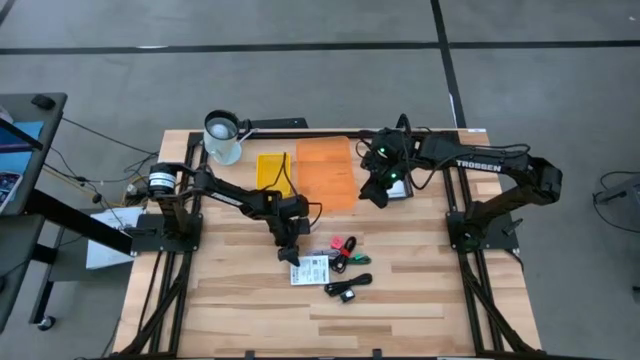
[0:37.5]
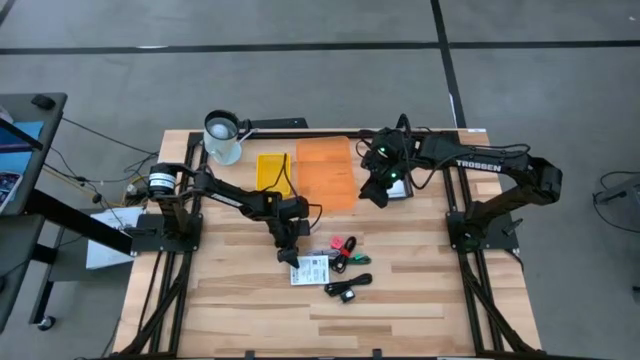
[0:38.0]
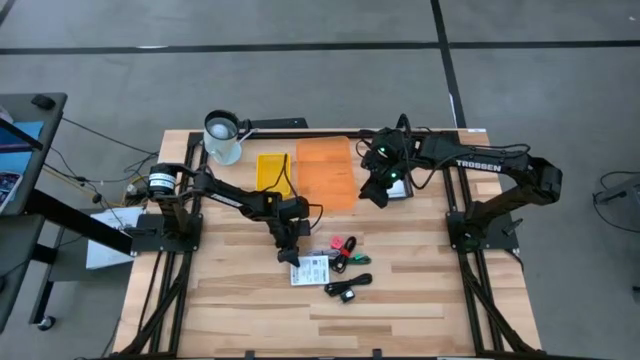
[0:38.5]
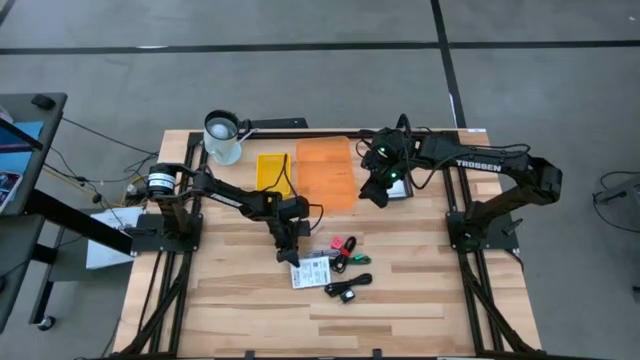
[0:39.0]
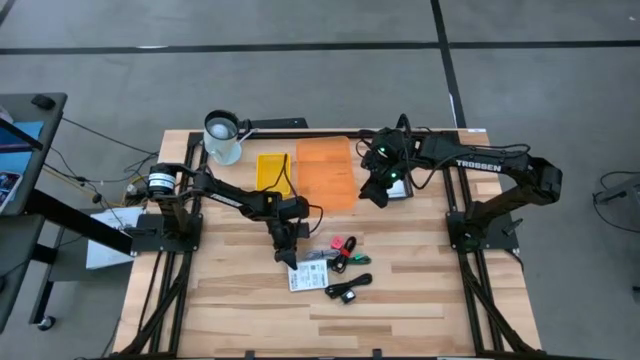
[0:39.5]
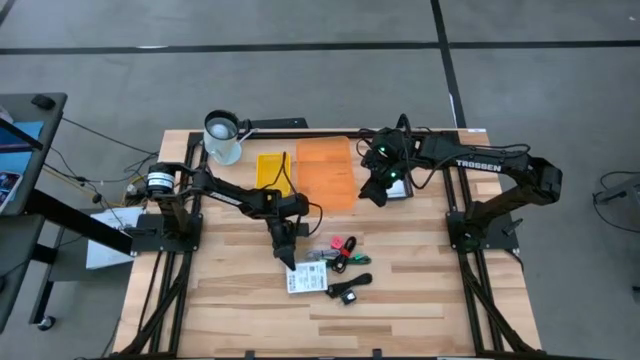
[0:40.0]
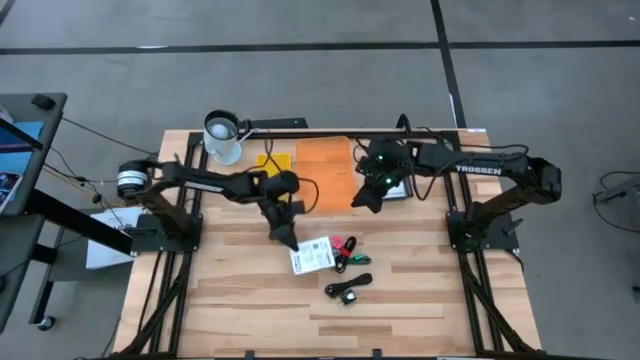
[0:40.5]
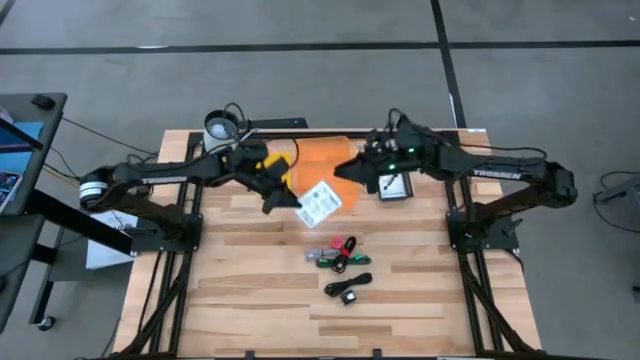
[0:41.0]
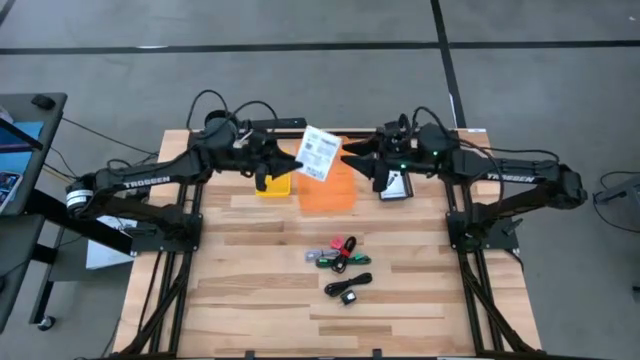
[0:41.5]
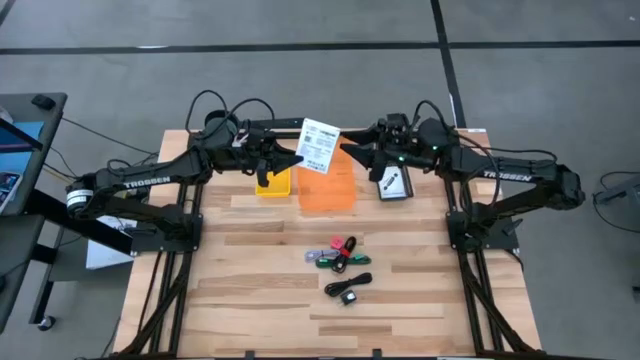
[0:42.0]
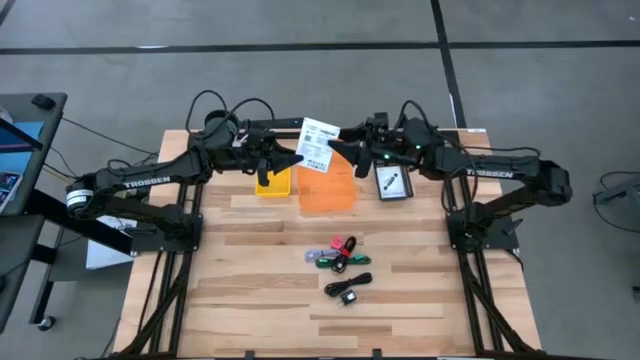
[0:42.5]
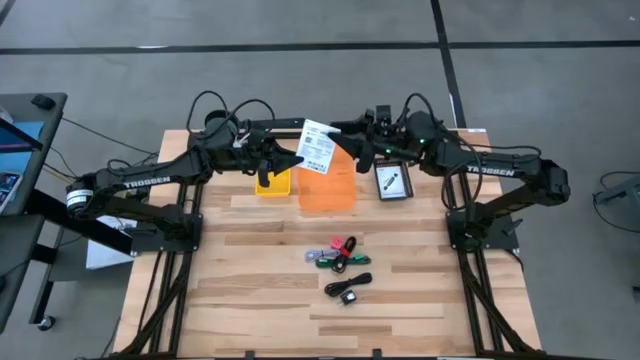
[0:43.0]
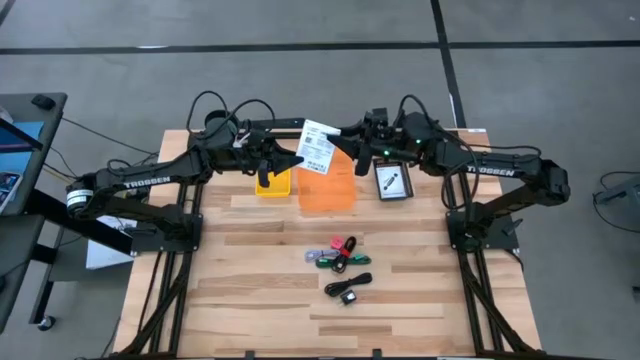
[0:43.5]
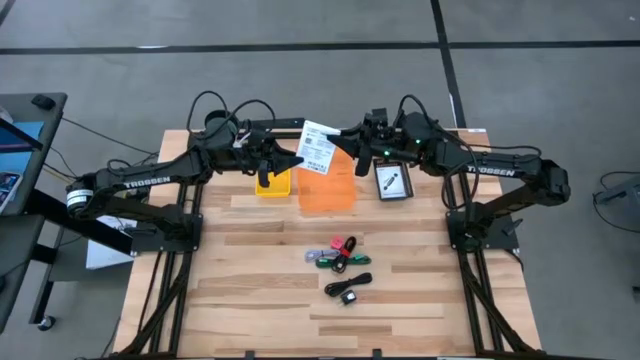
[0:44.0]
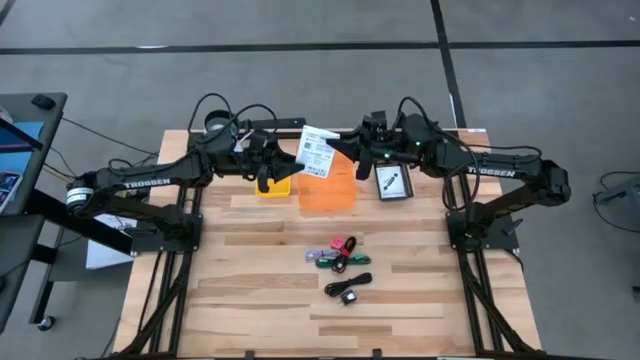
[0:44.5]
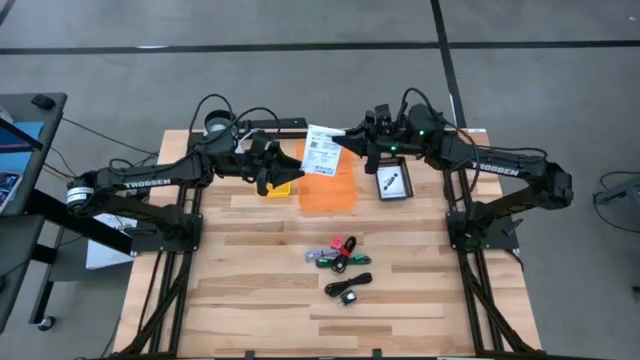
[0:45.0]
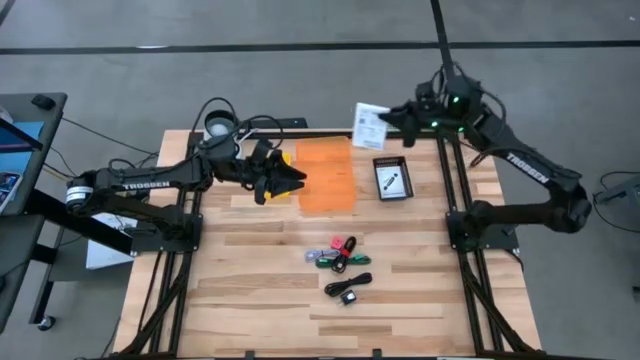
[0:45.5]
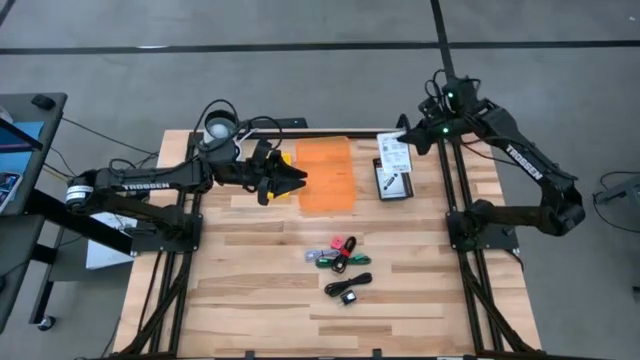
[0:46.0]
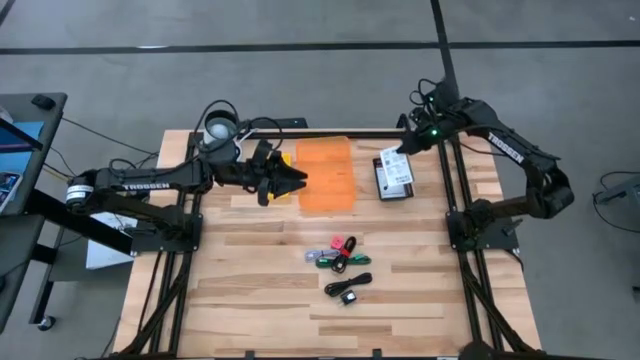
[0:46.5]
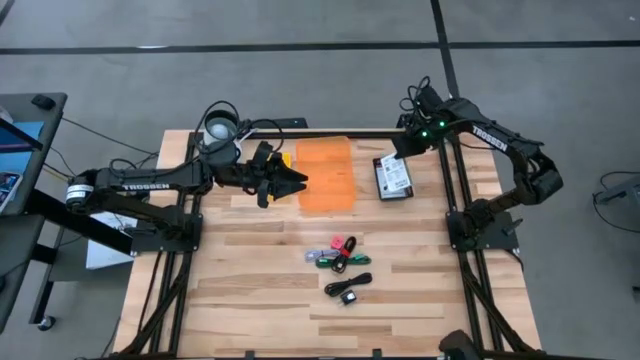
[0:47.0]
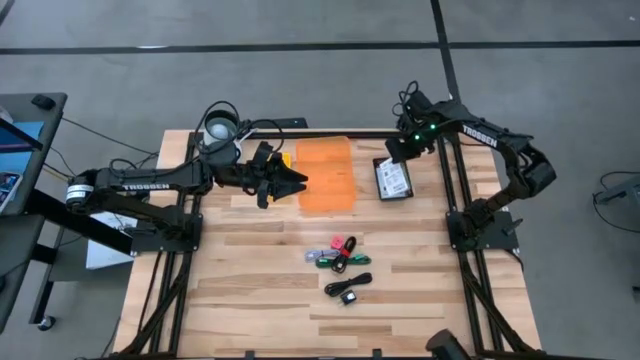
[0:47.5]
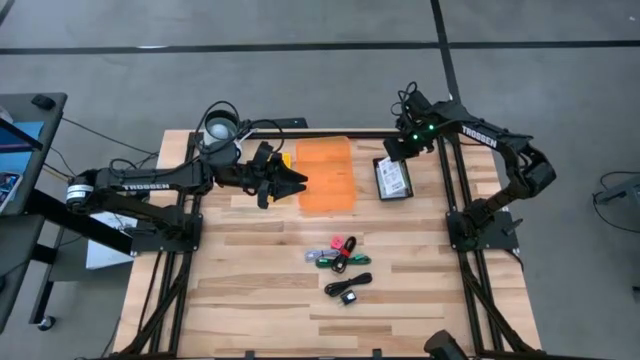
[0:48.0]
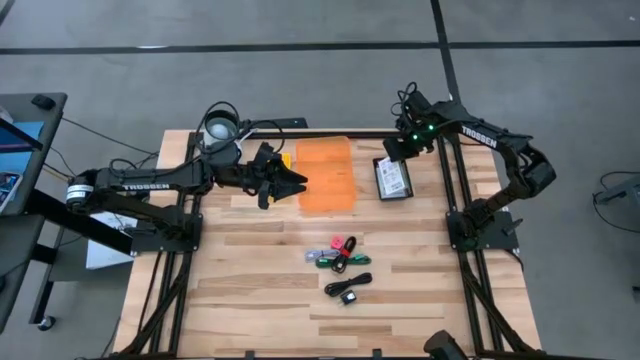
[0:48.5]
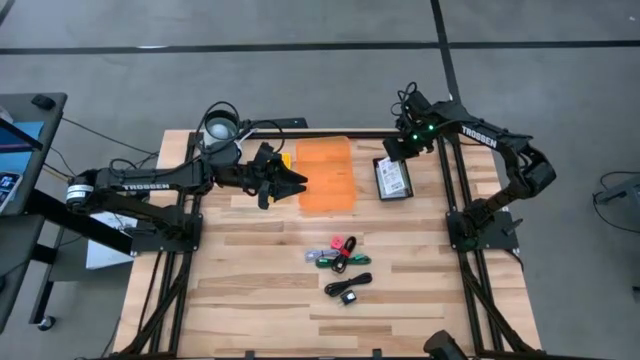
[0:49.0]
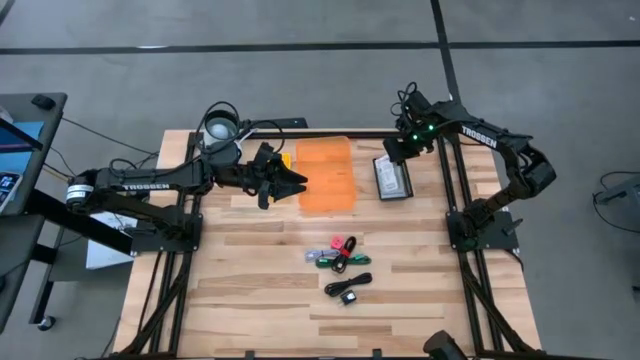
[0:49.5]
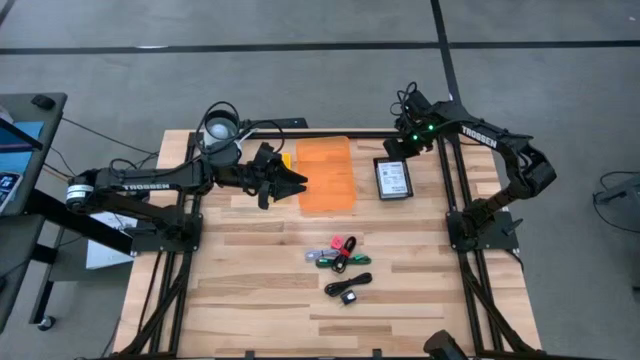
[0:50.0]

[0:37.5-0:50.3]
Task: Pick and place items into bin
Put the white card reader box into the black bin

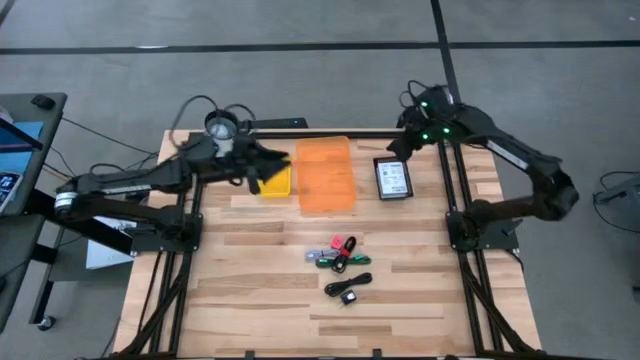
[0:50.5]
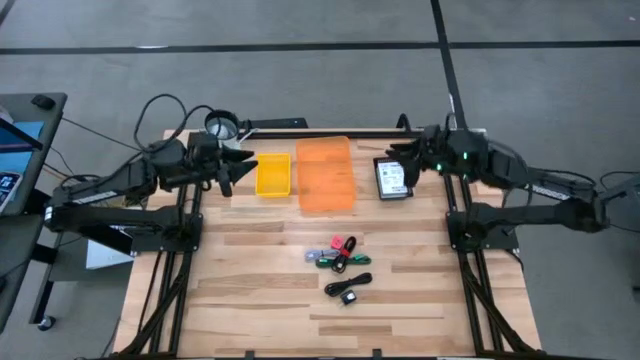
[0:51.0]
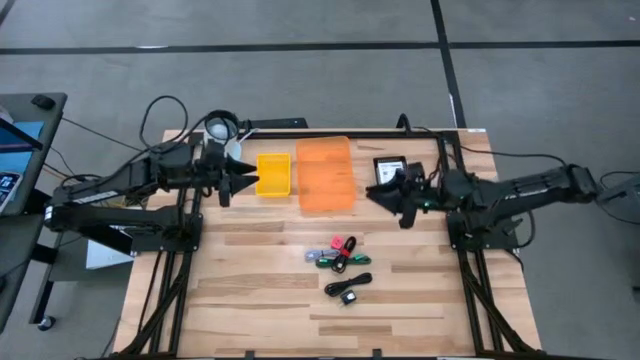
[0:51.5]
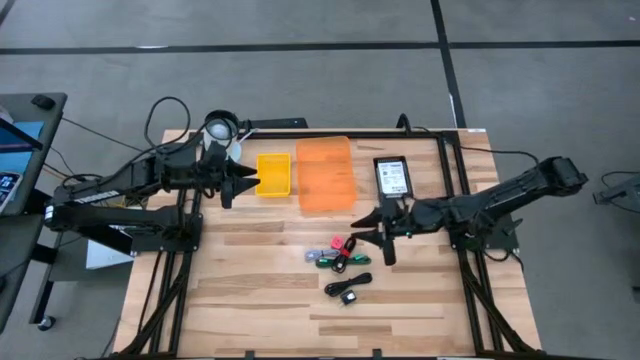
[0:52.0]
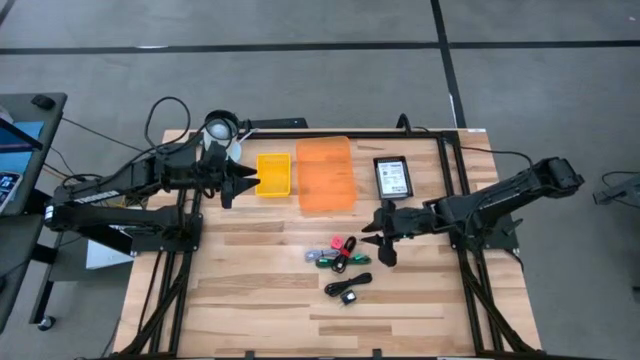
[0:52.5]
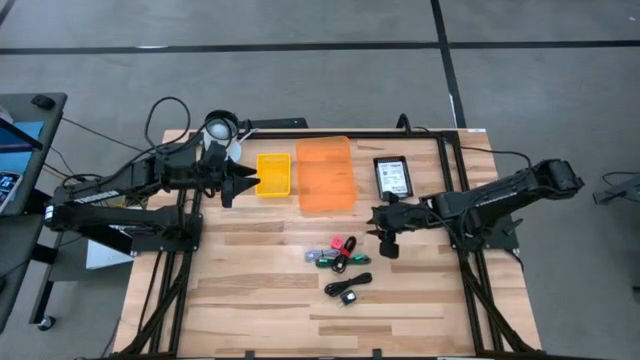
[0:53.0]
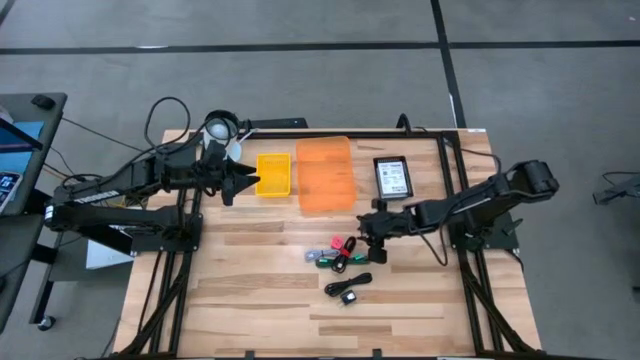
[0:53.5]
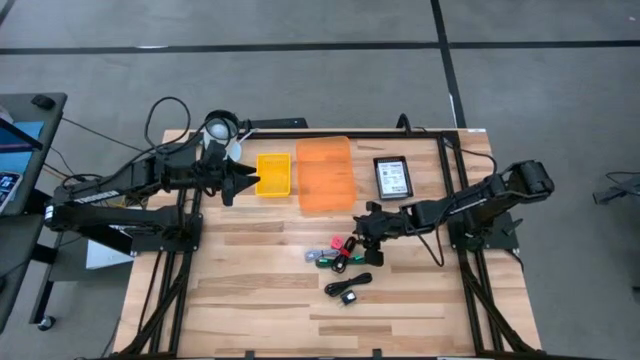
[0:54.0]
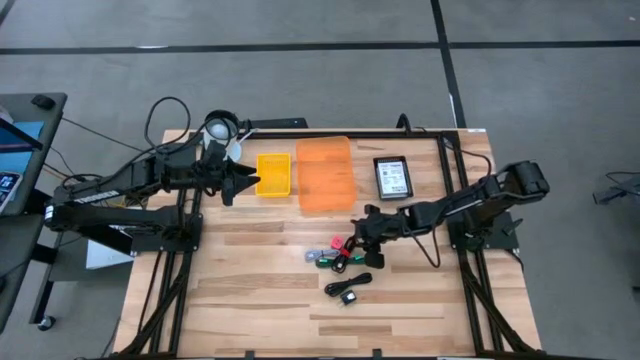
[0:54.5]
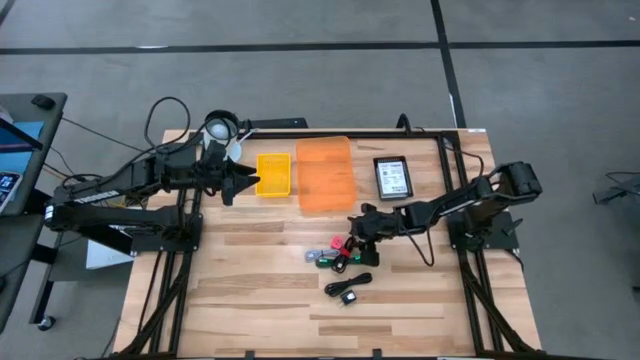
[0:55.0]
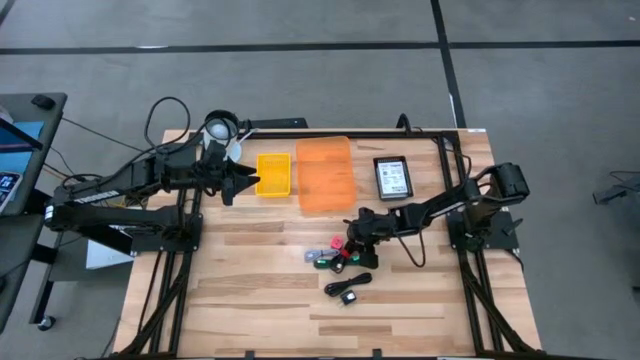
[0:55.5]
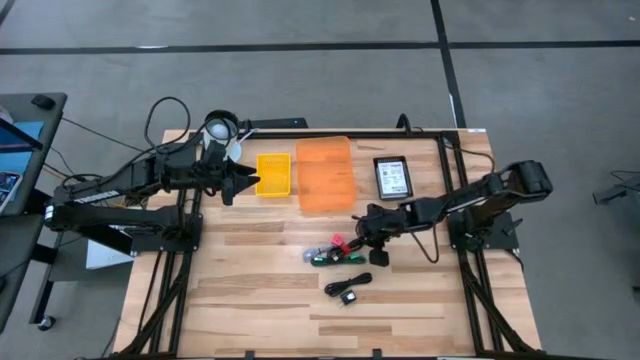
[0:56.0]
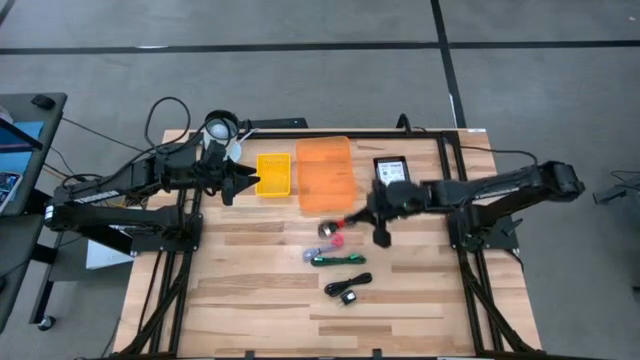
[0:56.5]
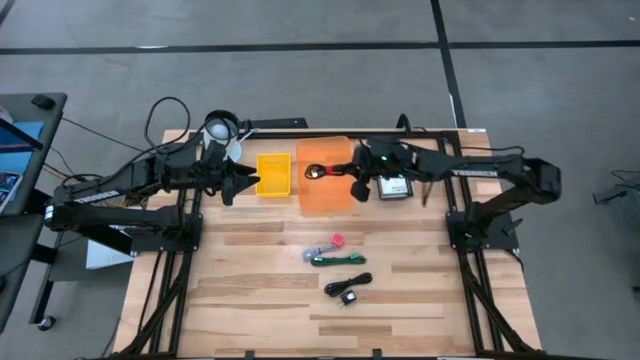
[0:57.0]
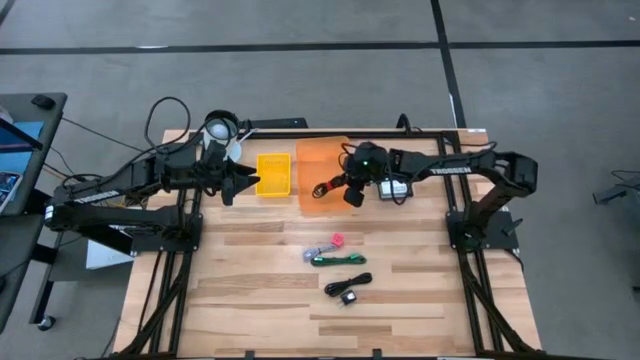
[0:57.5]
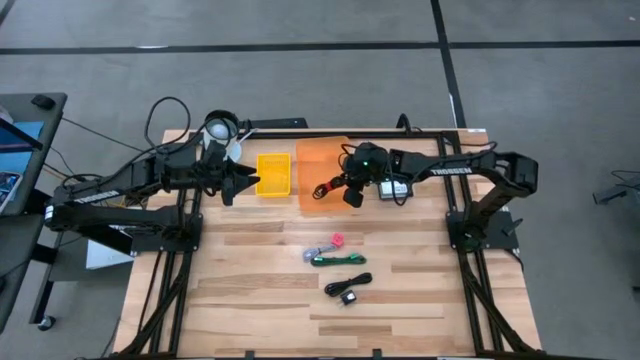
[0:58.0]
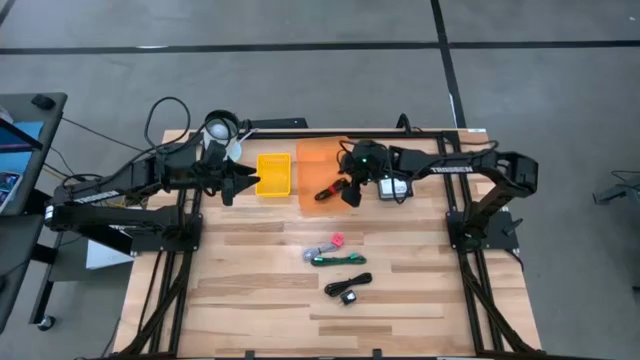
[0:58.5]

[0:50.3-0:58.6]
Put the top black USB cable into the orange bin
